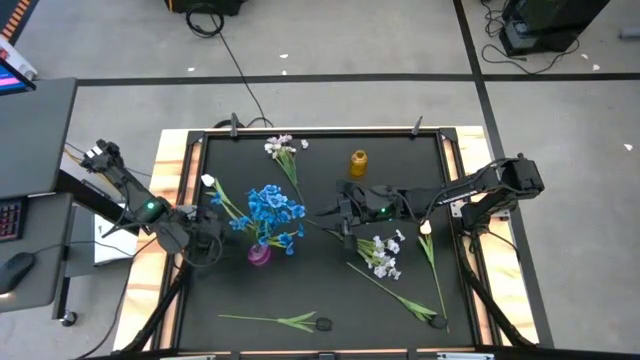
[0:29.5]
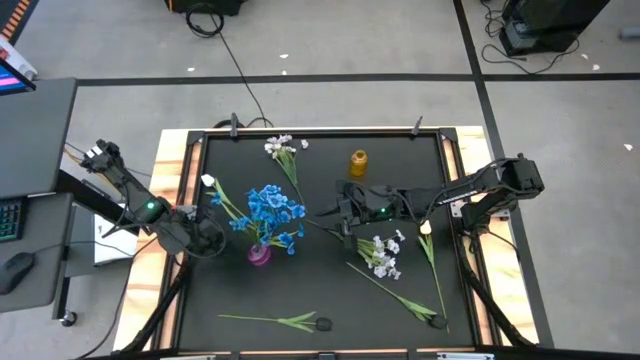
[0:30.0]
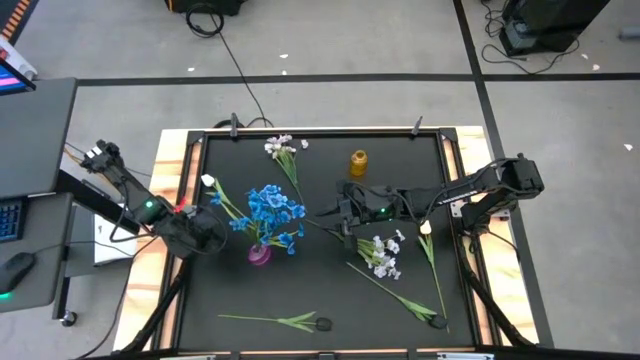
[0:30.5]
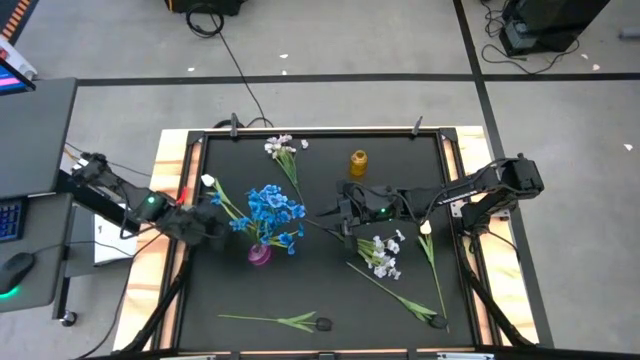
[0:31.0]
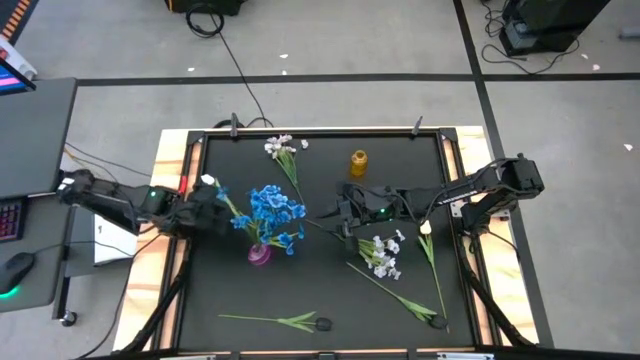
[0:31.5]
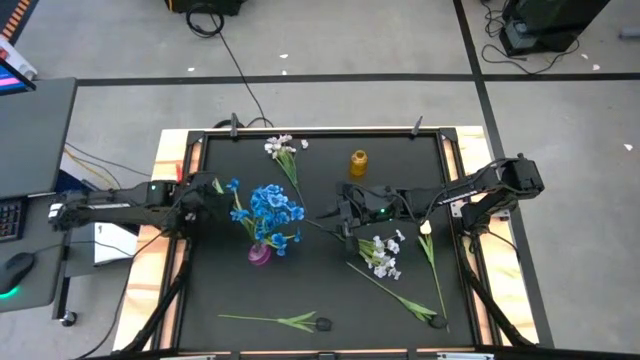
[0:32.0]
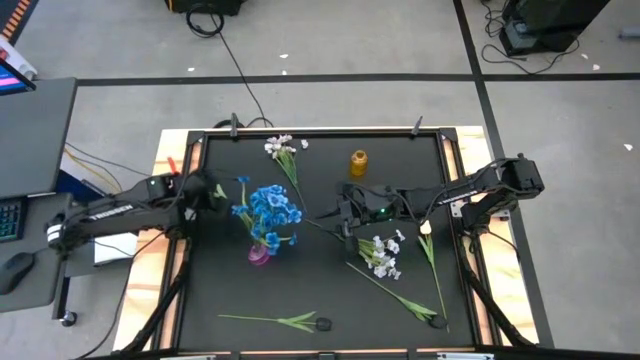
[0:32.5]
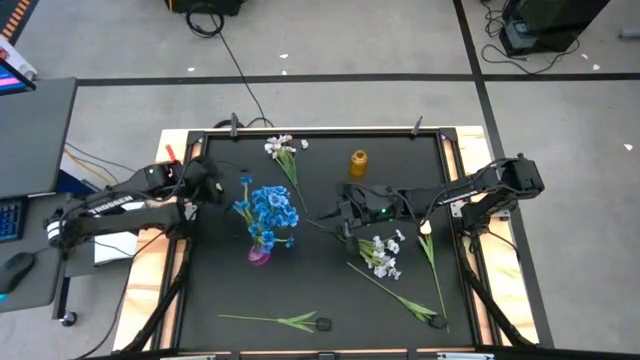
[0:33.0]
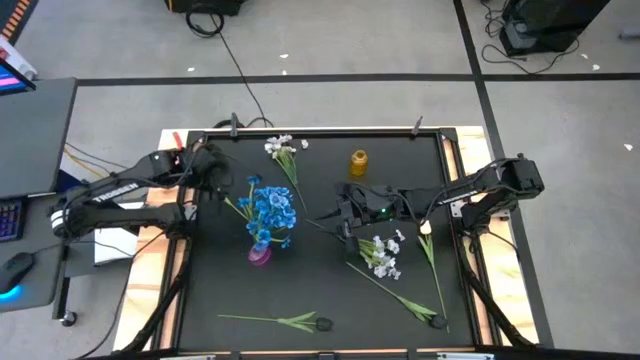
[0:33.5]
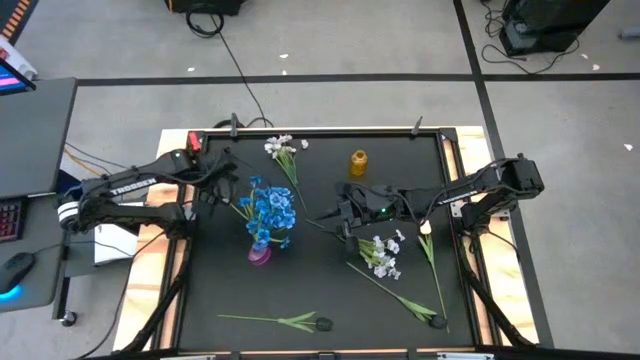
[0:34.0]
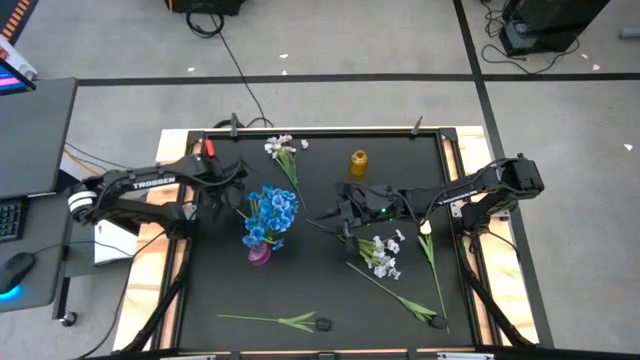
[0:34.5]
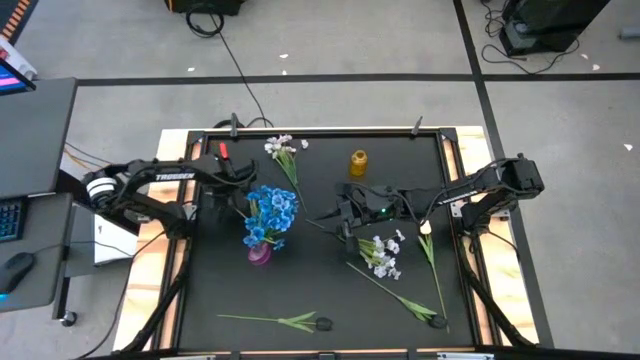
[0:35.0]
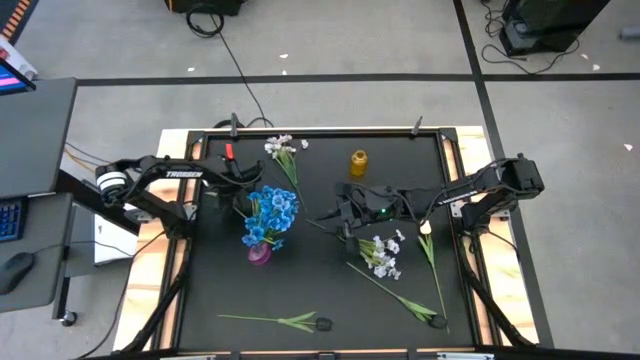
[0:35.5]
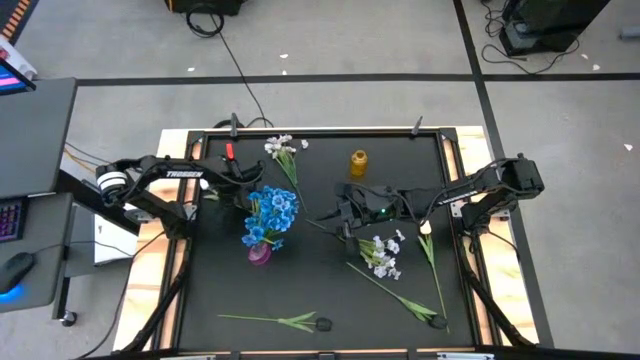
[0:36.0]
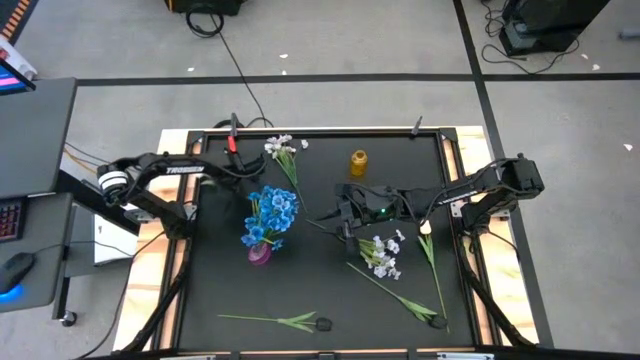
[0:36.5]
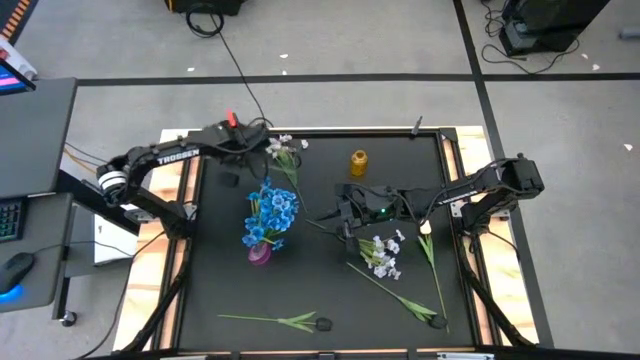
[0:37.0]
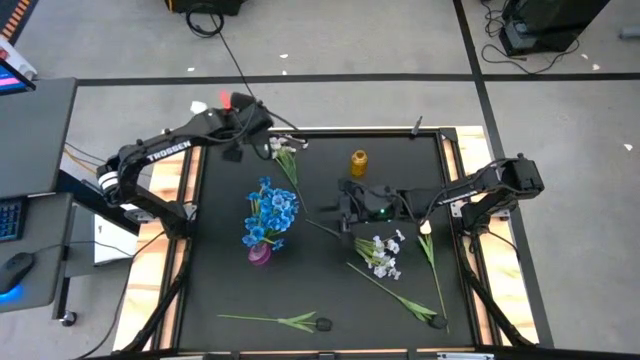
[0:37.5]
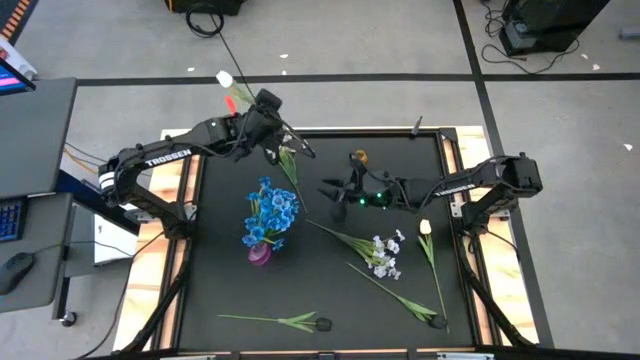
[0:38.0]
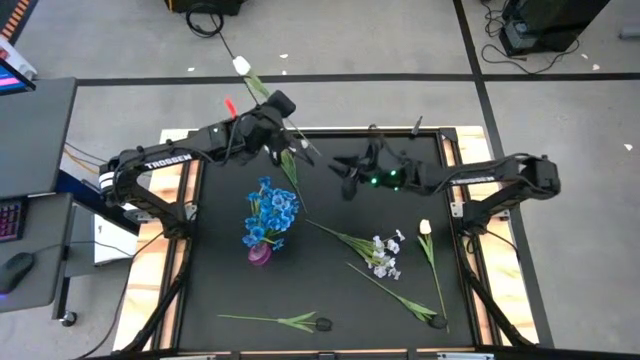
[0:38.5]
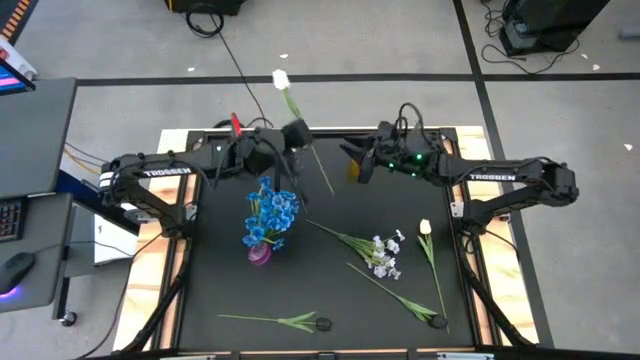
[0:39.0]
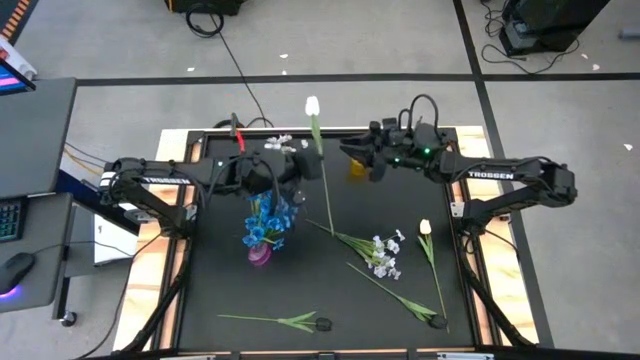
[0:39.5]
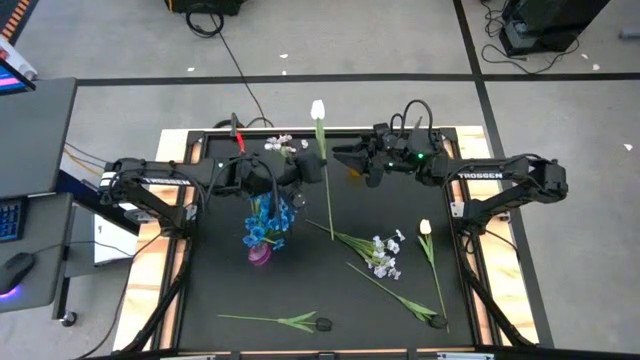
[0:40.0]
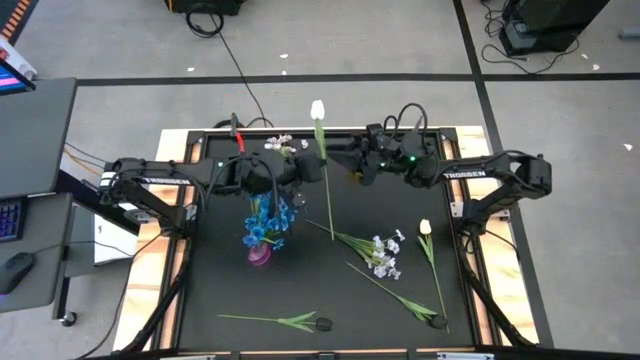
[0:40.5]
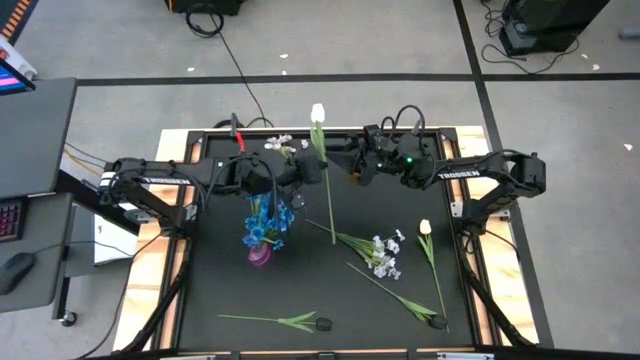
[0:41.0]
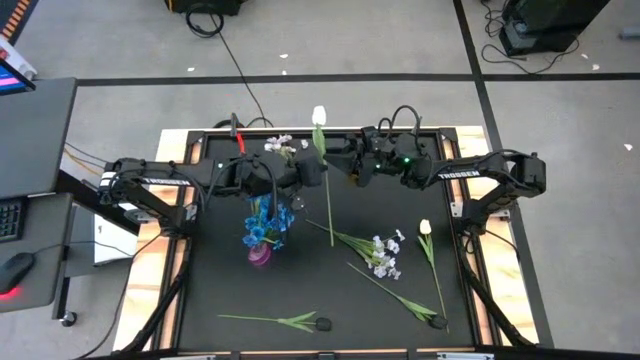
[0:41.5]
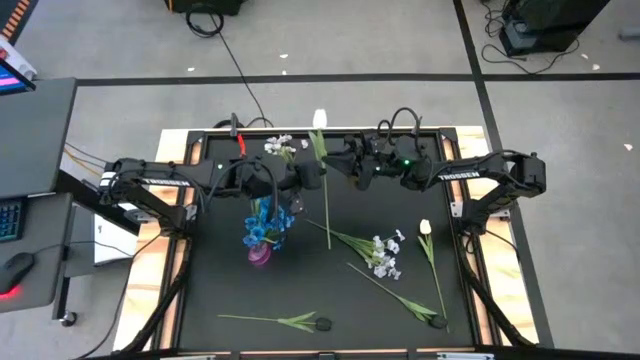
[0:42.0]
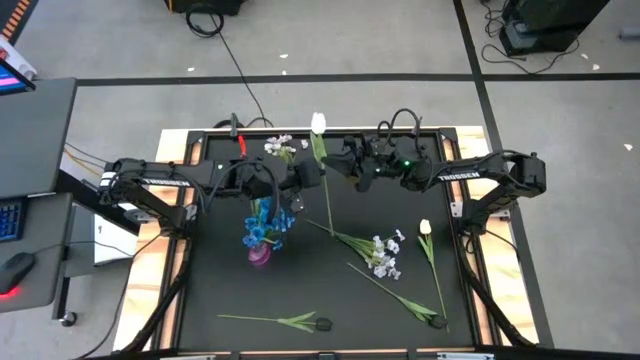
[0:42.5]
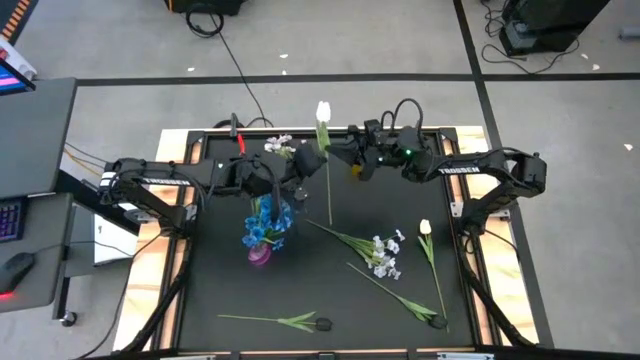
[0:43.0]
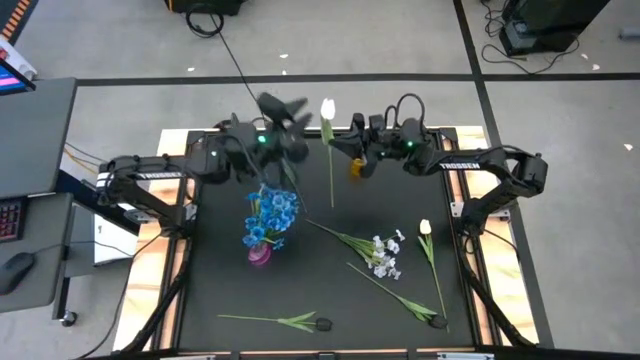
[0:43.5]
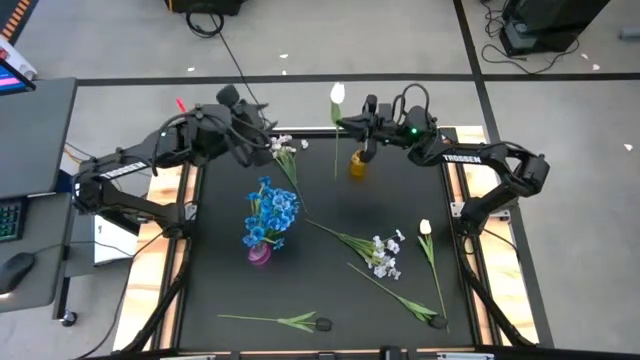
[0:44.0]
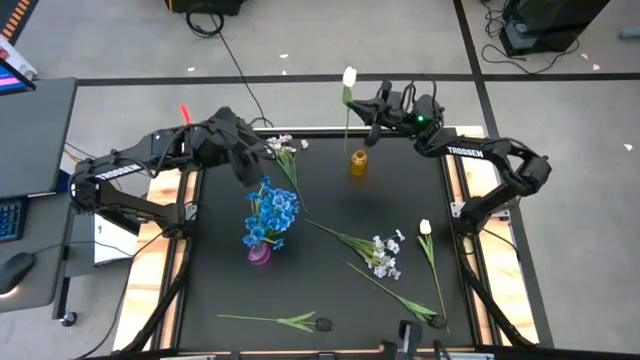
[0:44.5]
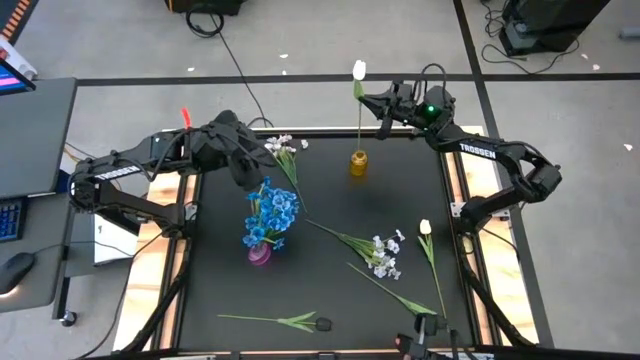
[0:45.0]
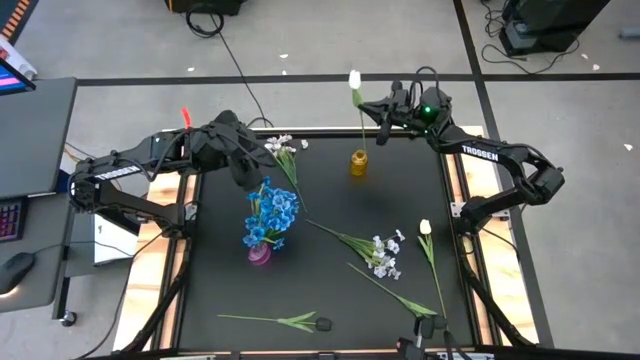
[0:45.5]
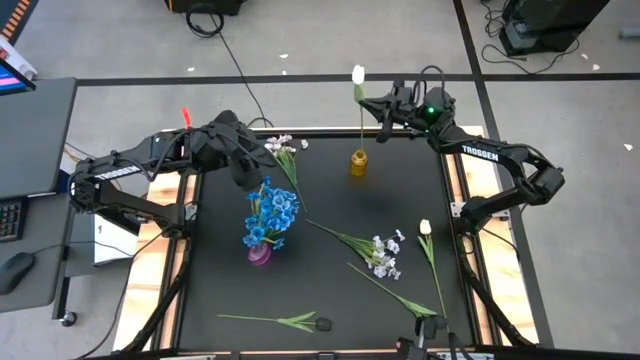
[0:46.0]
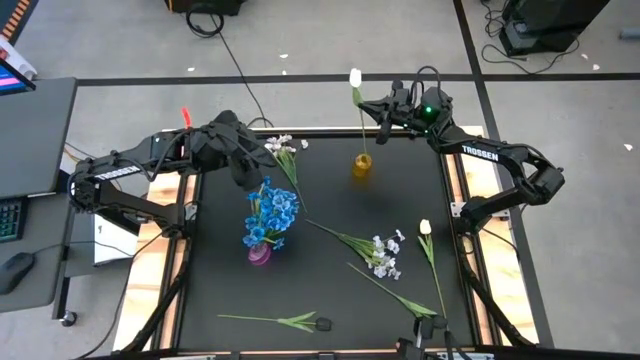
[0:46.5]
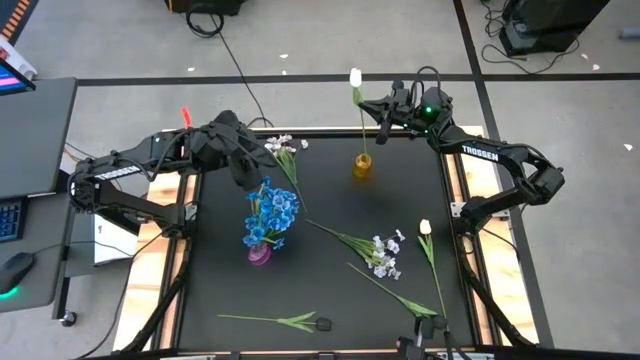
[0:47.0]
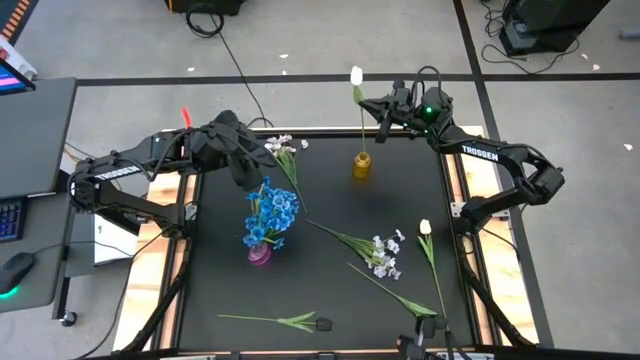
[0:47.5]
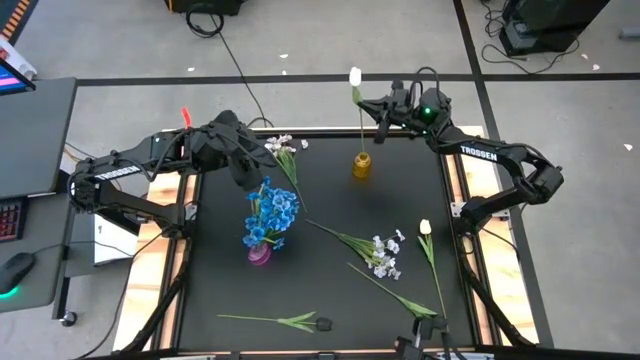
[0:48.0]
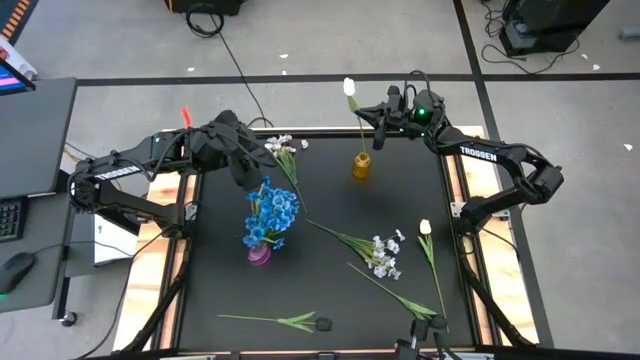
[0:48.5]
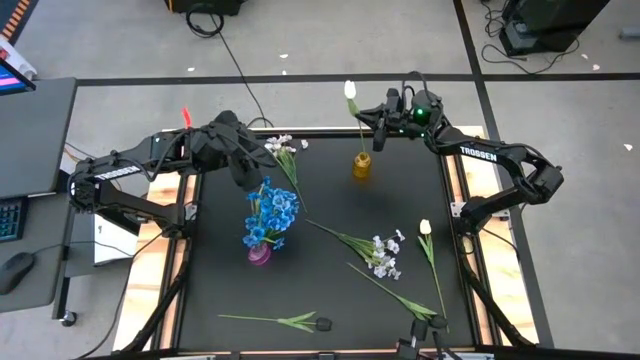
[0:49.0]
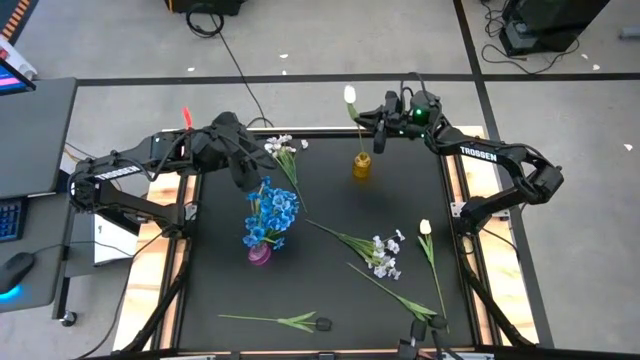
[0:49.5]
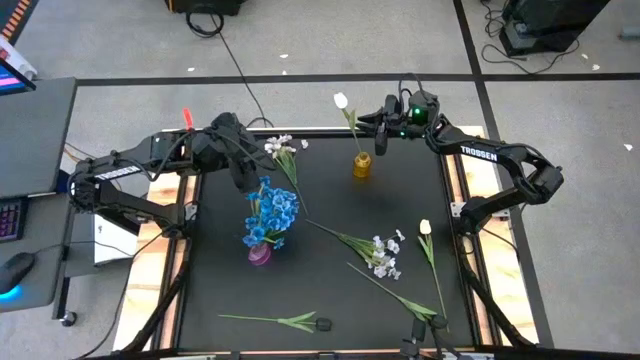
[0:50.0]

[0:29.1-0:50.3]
Task: Sort flowers into vase by color
Put the left white tulip into the yellow vase
